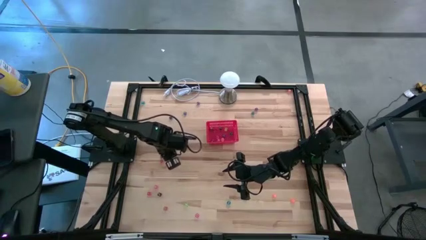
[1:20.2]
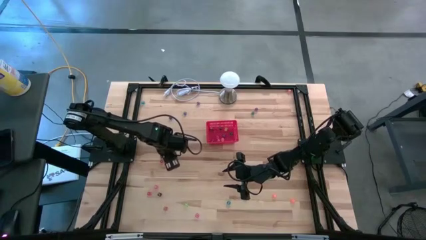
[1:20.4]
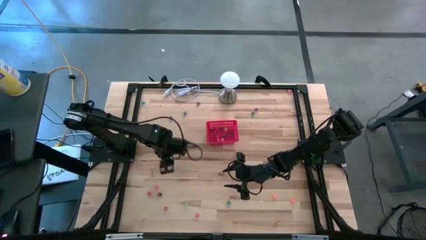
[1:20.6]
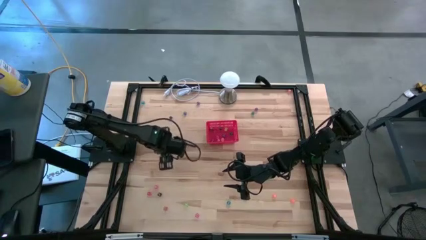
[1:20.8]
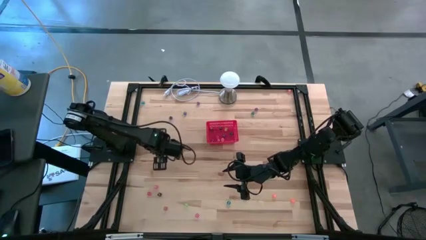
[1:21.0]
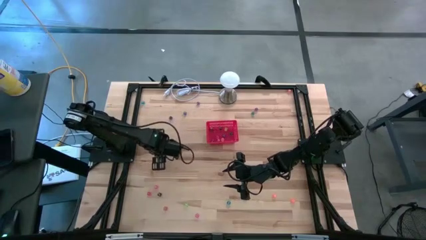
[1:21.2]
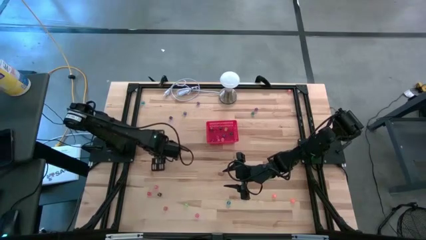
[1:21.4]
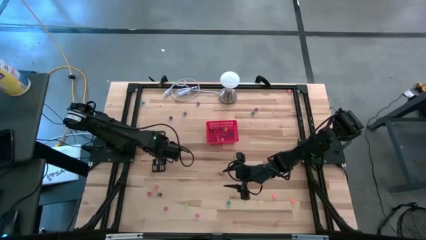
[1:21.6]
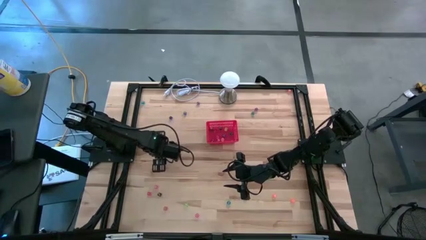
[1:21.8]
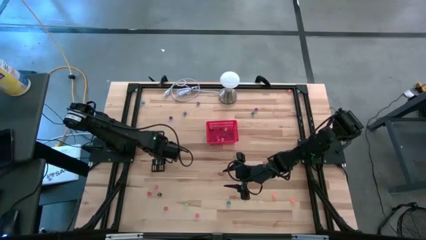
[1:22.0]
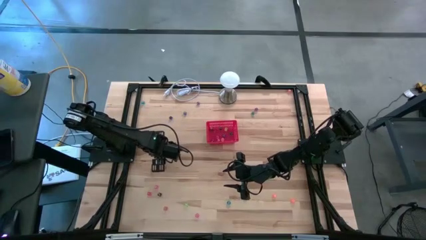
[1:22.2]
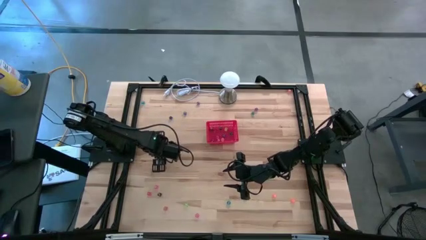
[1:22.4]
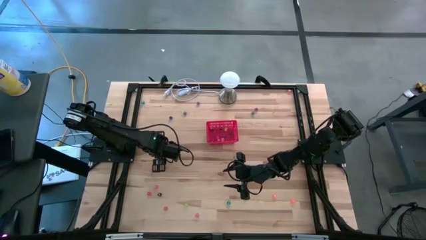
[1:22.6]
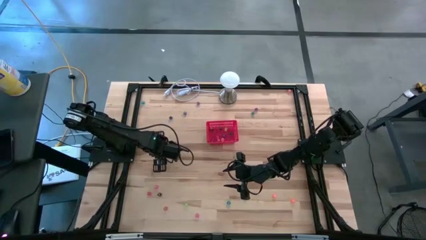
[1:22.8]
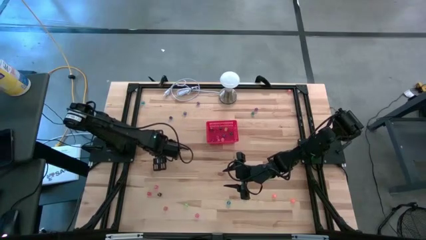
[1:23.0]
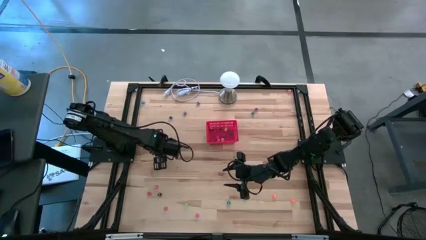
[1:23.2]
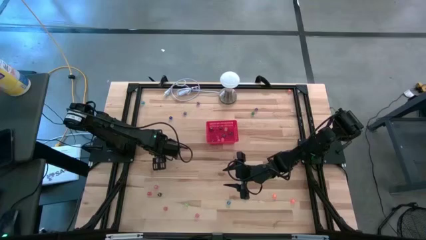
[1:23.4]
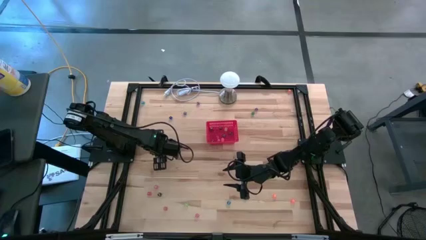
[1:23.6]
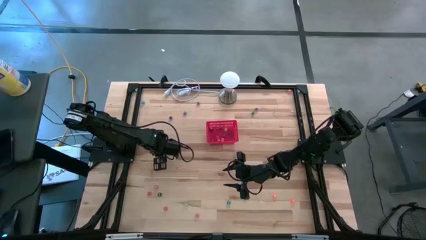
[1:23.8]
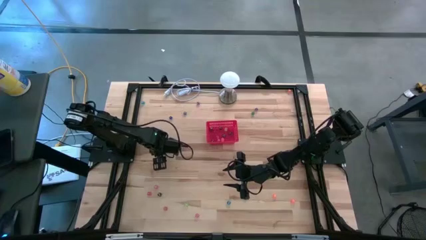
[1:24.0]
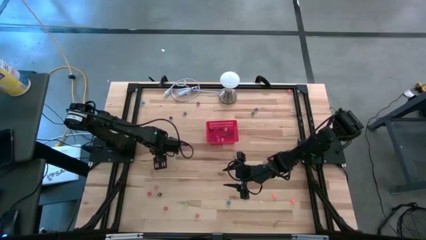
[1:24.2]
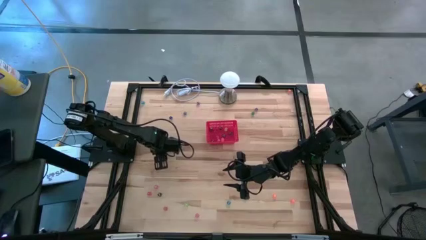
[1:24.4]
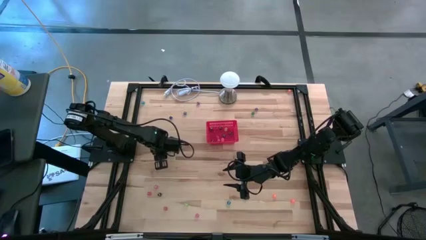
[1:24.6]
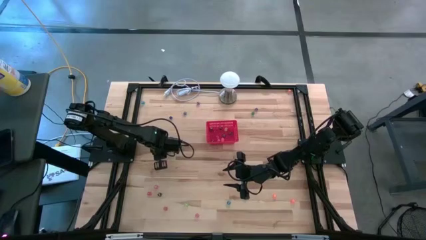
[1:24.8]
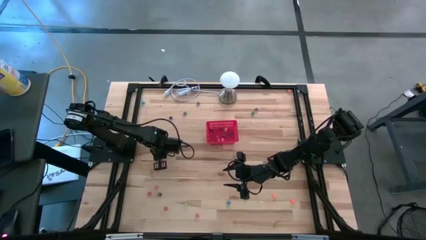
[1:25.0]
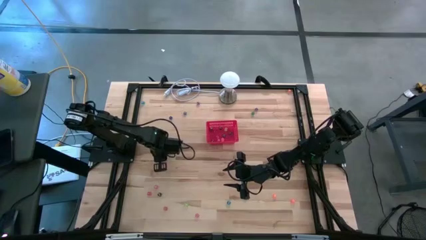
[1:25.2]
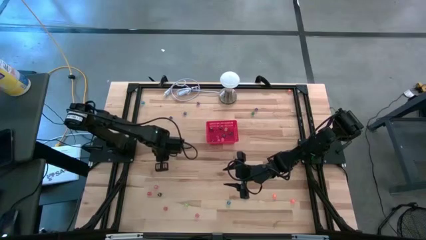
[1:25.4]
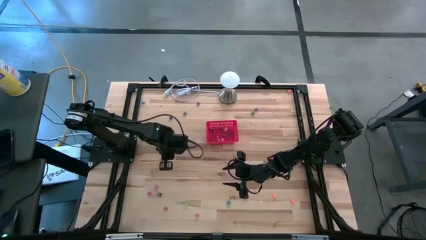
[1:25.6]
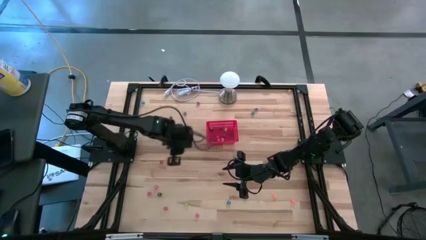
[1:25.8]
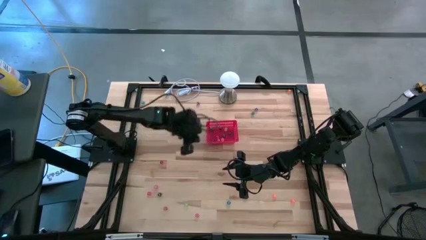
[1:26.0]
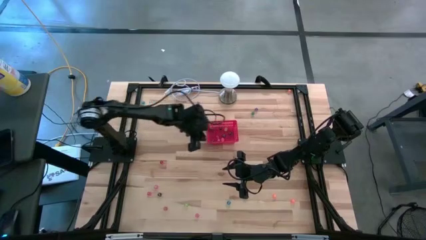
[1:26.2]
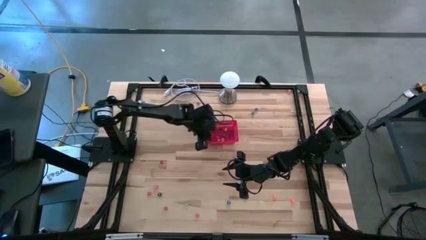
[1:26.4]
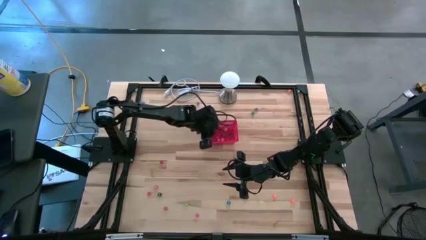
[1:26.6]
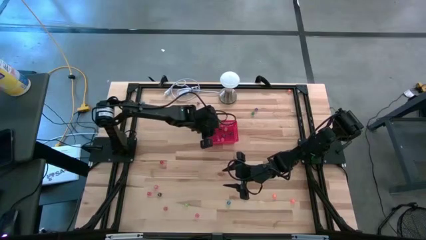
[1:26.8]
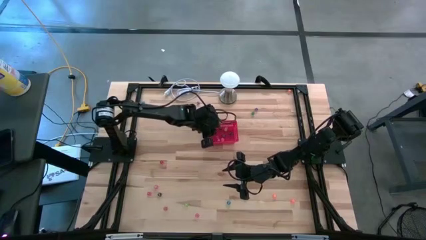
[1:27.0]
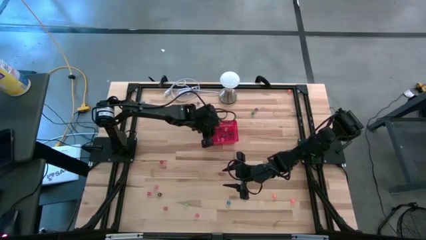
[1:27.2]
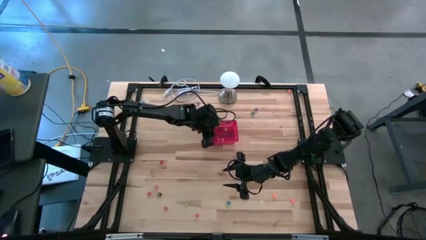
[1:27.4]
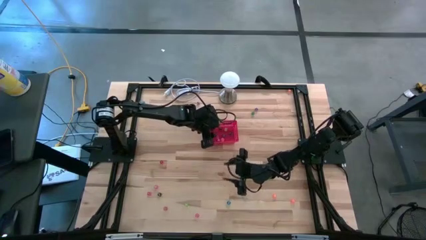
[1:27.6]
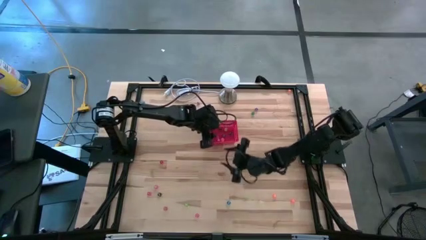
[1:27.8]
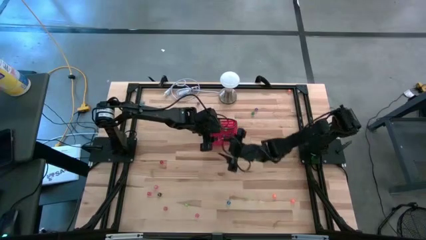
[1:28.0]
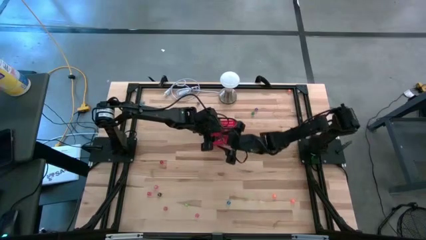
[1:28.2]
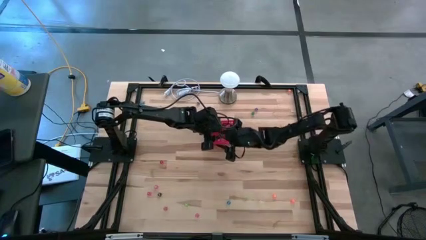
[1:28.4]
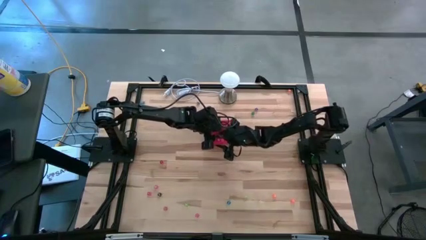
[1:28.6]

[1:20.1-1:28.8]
Task: Pick & Place Dice
Put the top black dice into the bin

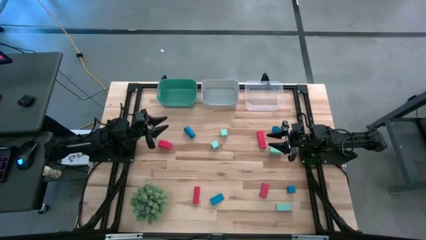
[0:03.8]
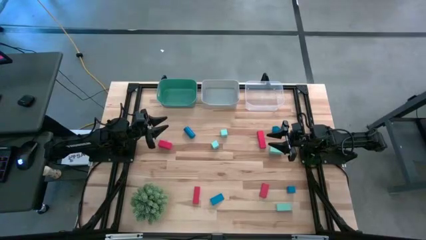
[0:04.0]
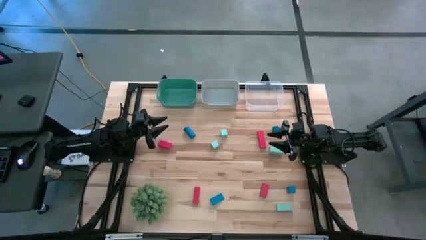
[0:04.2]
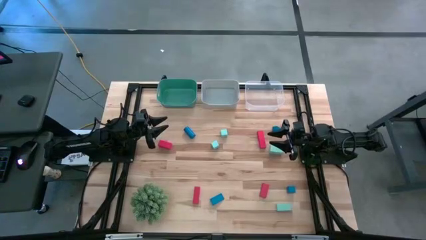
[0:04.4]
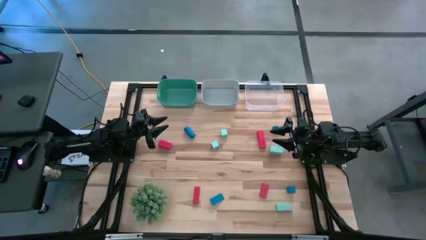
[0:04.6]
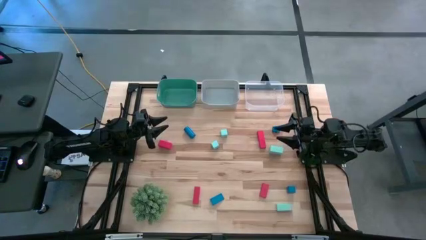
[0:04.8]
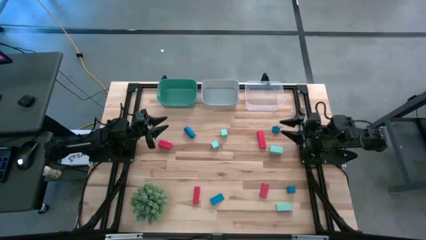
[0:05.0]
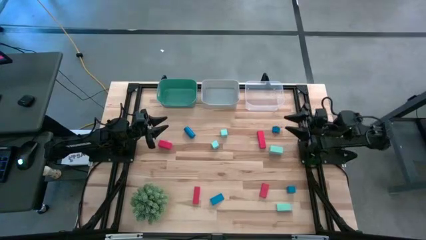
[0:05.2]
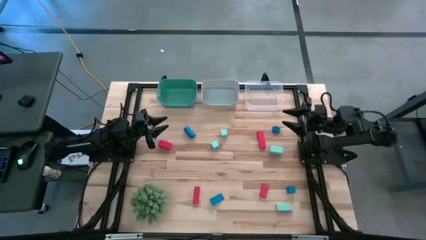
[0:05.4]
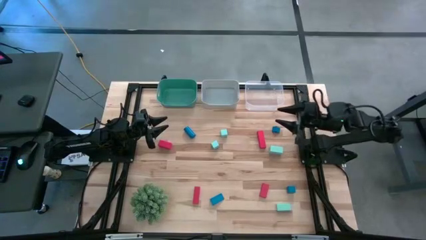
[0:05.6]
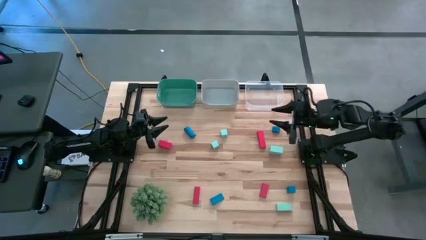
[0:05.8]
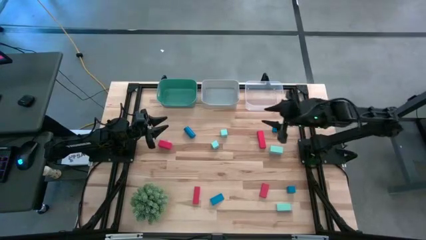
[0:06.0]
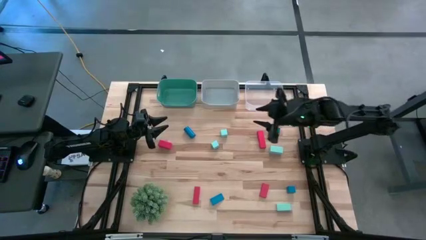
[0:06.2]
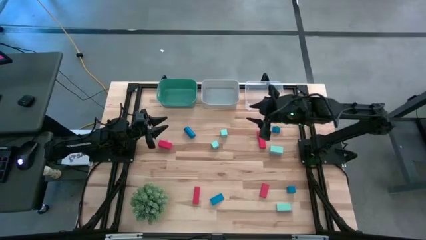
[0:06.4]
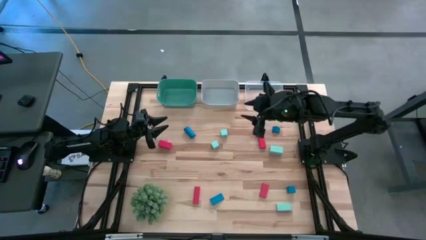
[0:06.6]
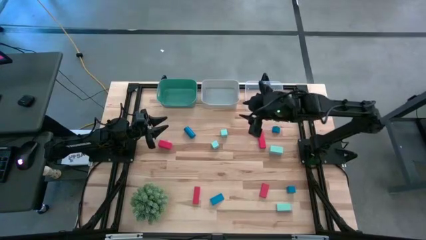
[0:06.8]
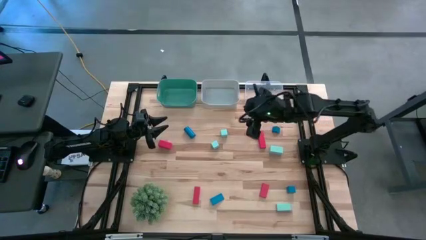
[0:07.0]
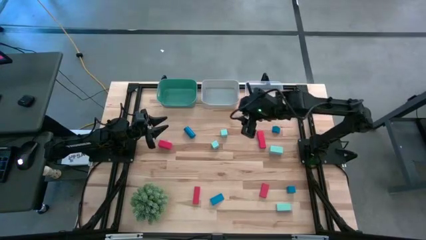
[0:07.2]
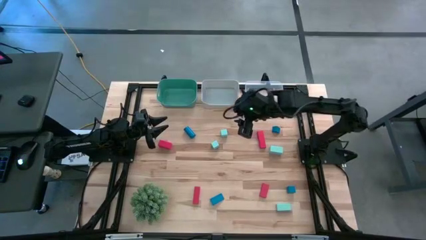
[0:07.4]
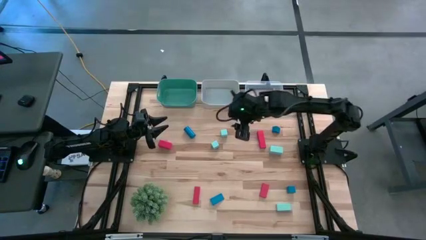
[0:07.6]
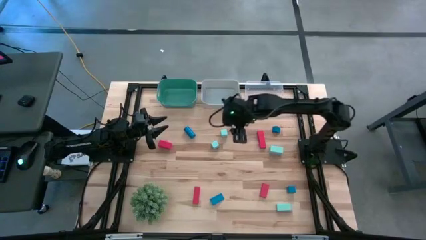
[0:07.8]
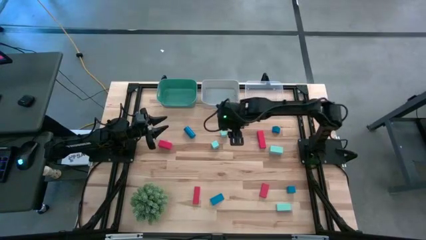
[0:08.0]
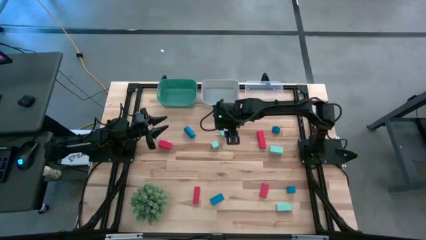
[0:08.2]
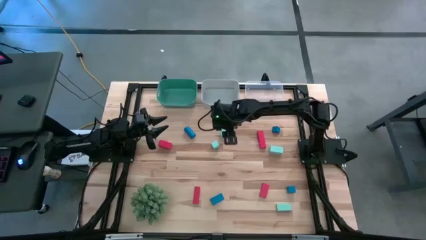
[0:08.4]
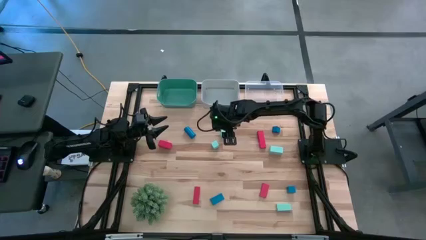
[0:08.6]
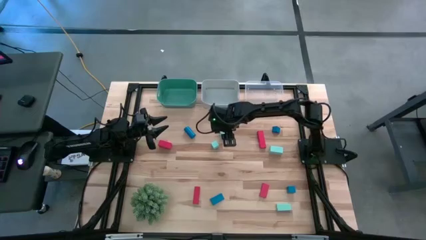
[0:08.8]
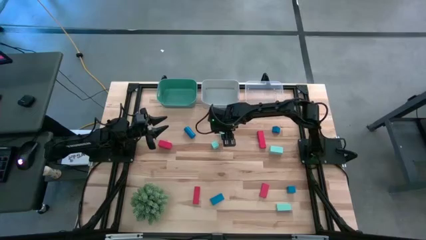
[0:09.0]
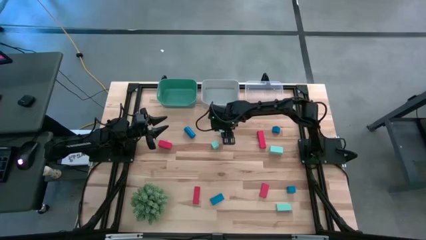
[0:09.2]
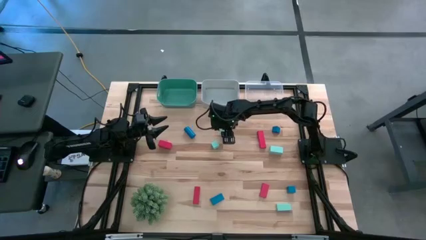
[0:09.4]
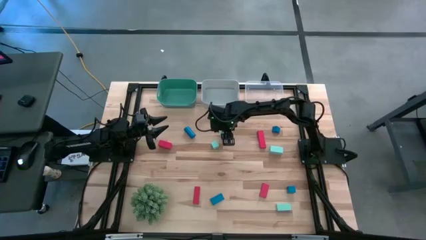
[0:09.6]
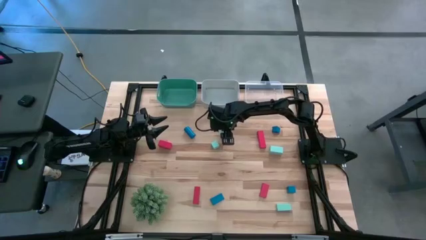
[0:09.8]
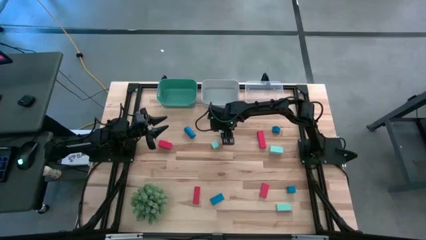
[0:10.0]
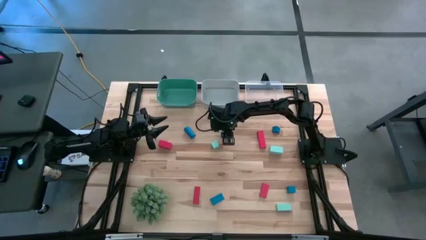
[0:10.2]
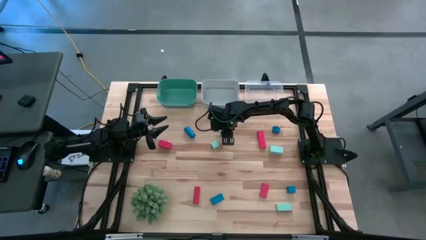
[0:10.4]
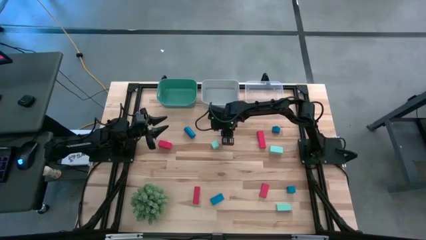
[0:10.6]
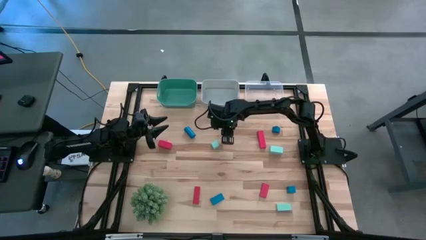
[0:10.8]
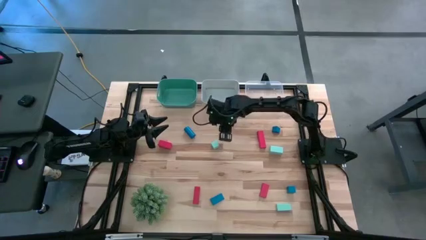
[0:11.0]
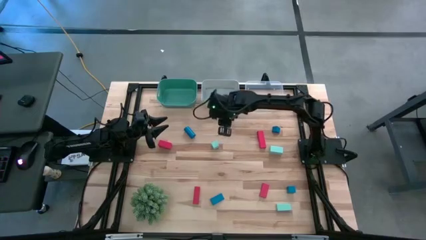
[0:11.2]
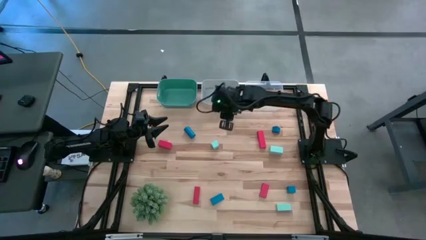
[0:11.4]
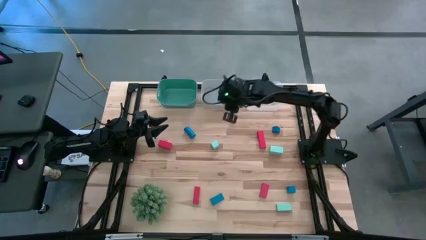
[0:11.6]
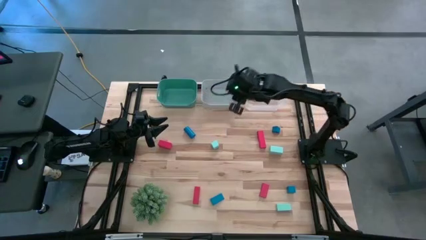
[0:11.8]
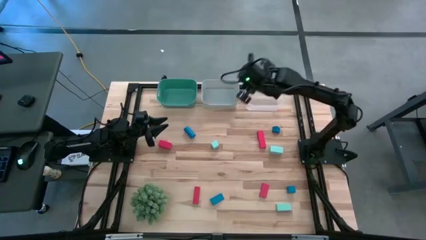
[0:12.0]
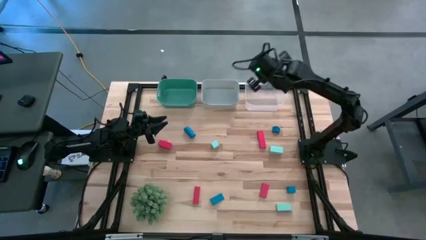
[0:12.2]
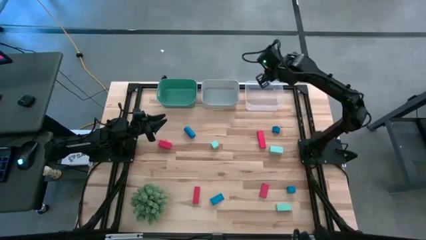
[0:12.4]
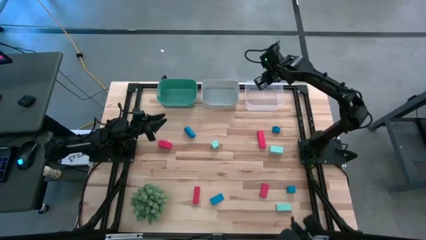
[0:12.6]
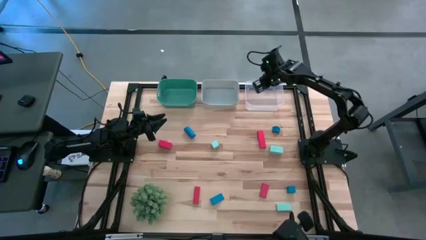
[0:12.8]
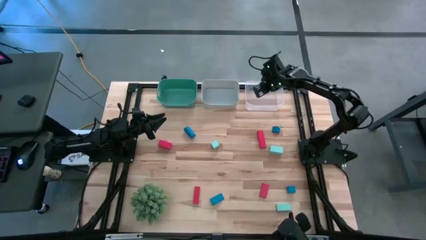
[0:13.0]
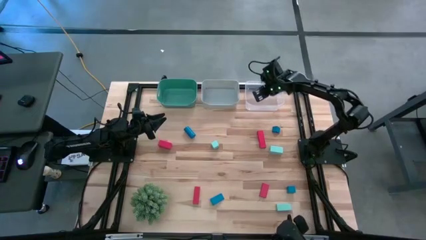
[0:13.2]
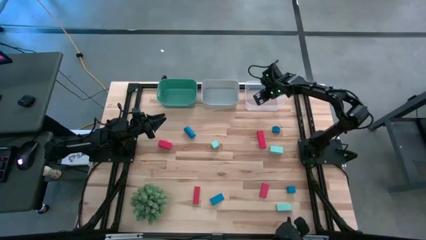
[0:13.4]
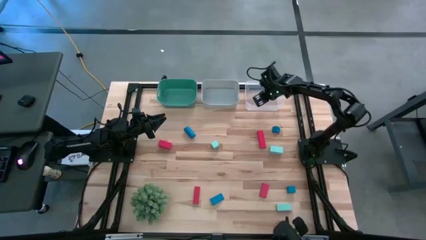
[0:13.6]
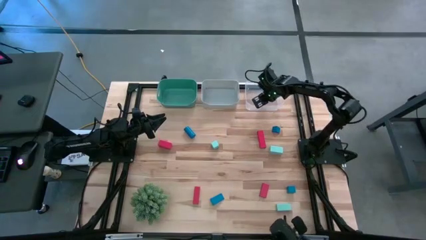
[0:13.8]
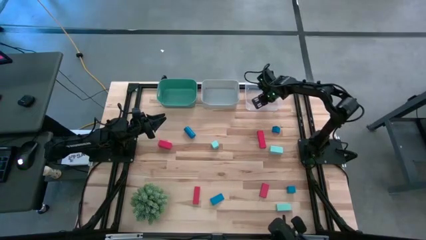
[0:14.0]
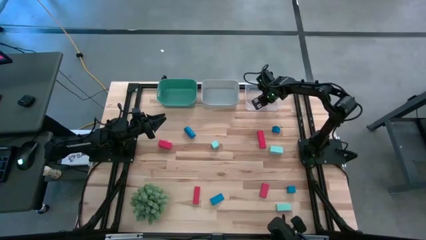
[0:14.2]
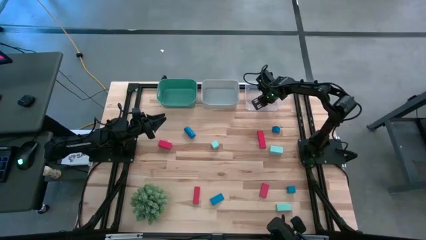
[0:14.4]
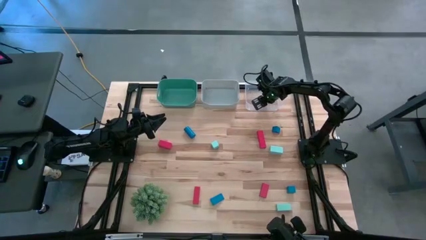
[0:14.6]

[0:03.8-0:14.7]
Task: Sort & place blocks by color
Put the light blue block into the transparent bin
